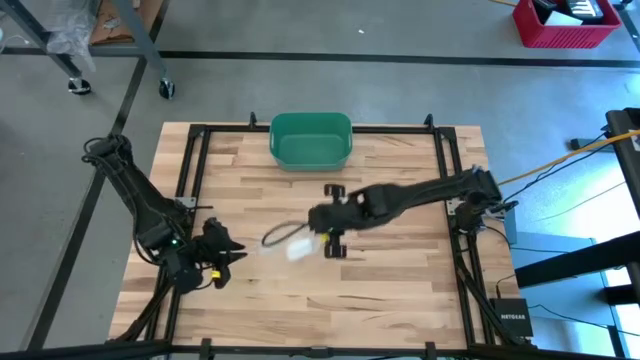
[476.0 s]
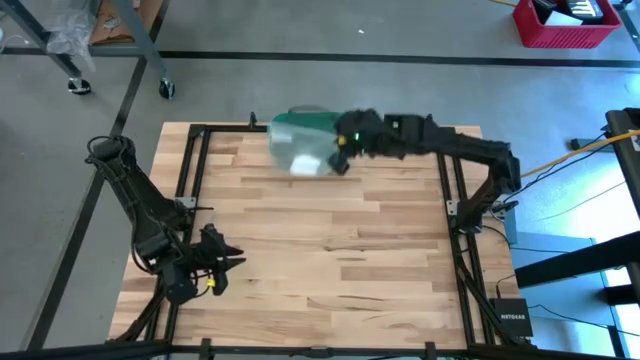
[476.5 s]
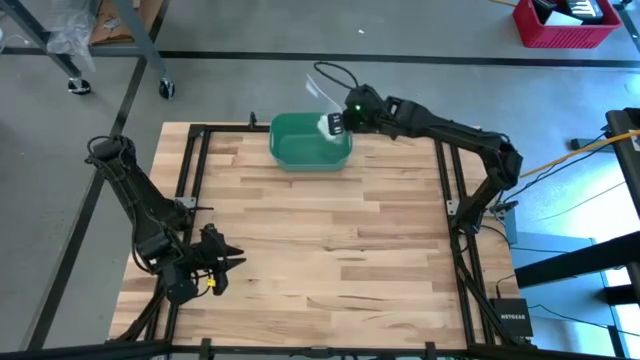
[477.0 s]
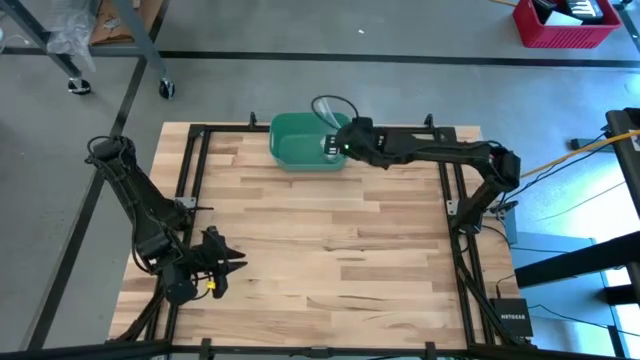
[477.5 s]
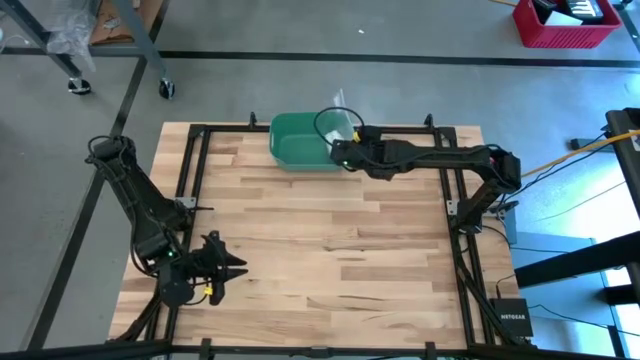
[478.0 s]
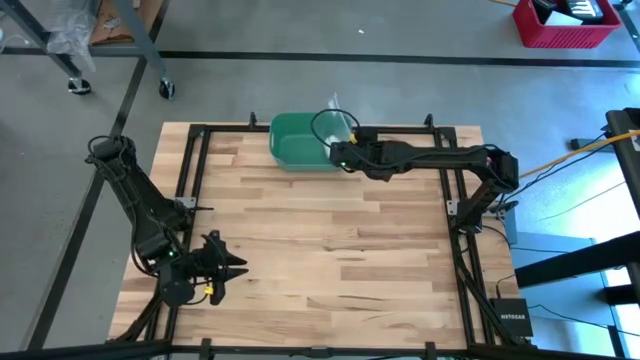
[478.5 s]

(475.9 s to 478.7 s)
Task: Roll bandage
Put the transparent zip bag into the green bin

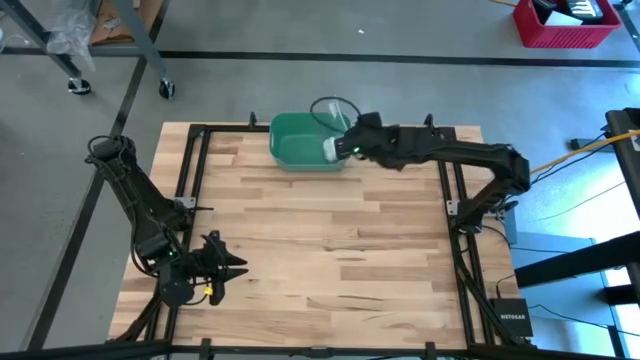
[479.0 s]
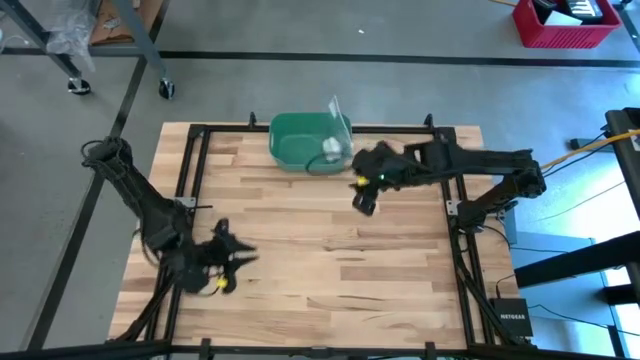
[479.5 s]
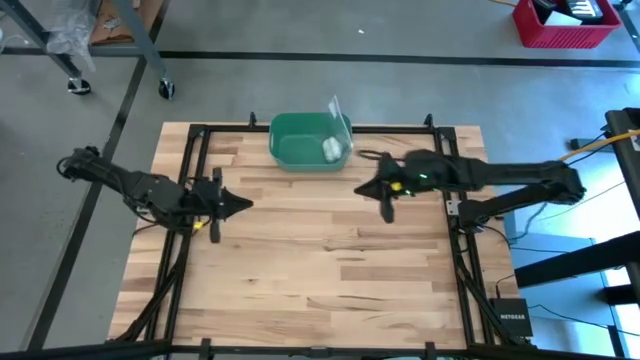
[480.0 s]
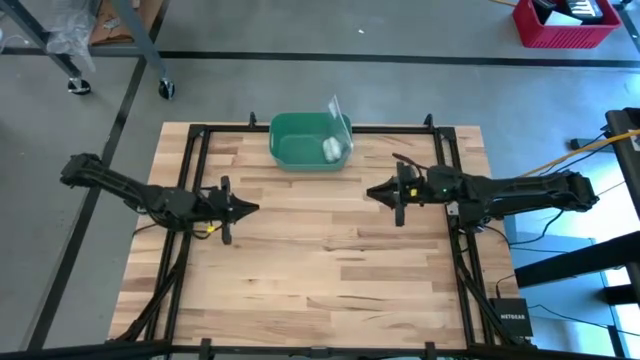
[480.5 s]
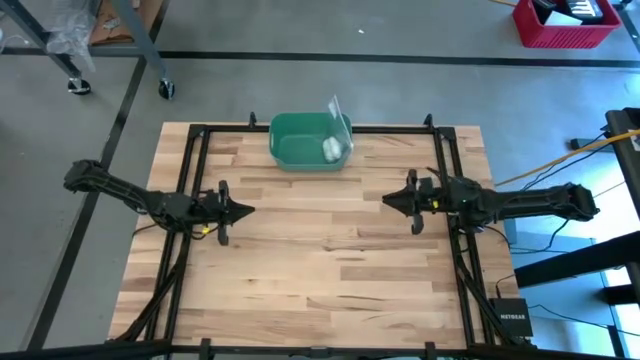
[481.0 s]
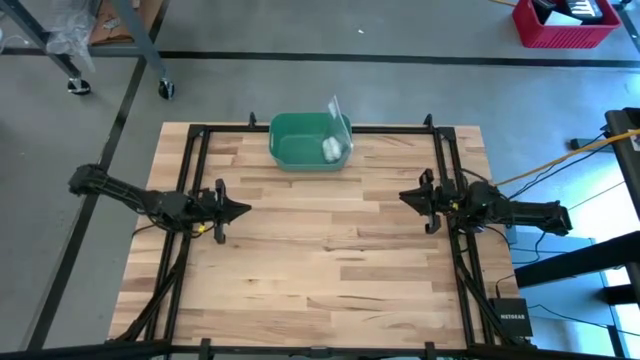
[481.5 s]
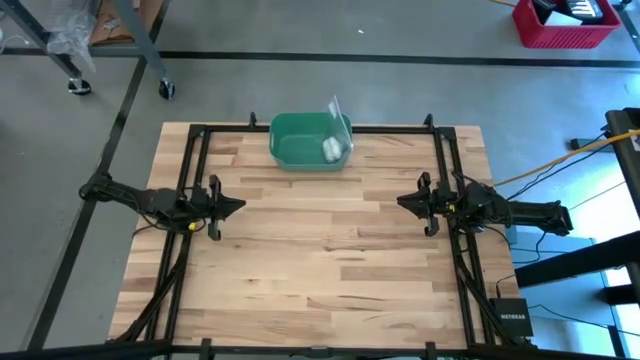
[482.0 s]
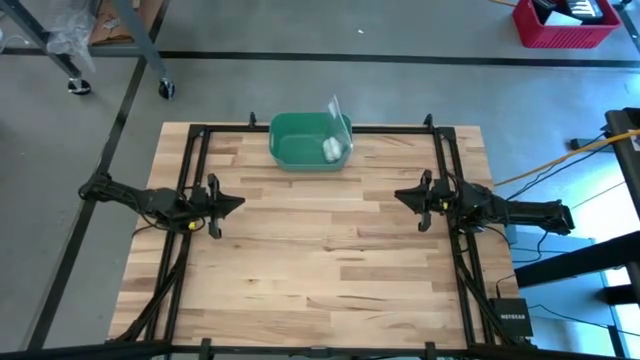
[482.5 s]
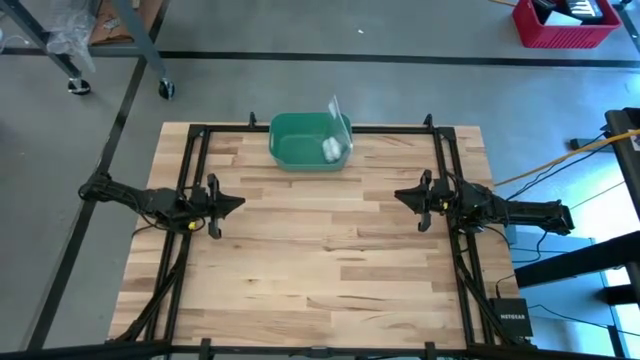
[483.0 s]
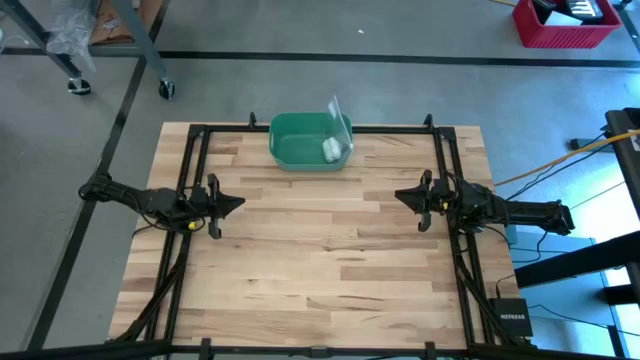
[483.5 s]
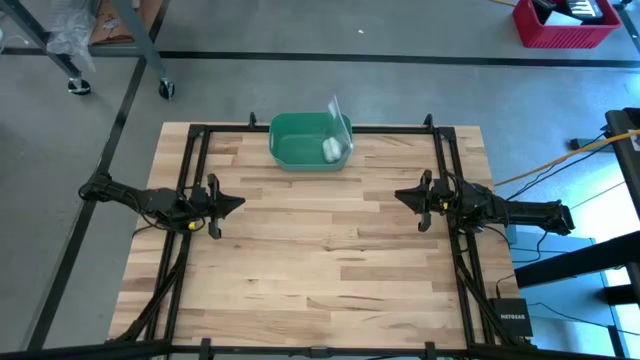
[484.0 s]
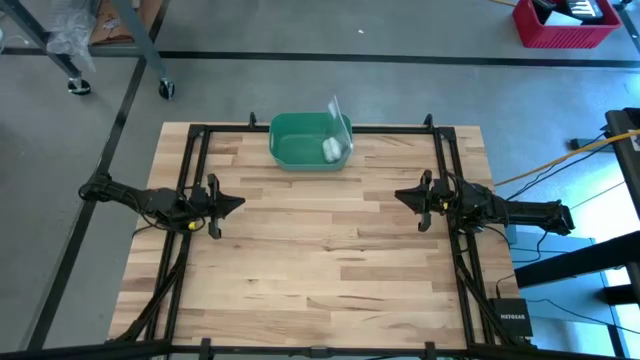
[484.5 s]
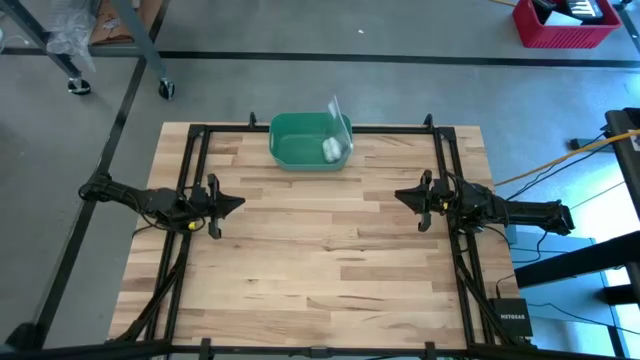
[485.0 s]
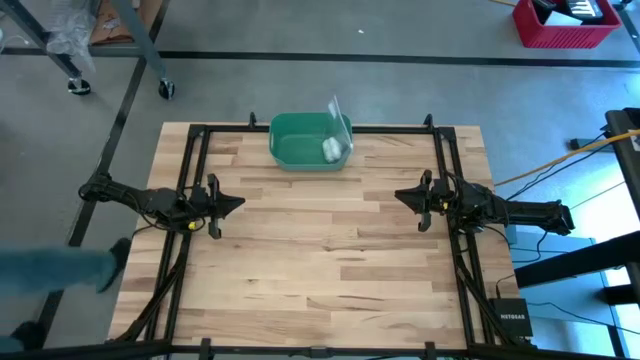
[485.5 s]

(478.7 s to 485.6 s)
Return to Home Position

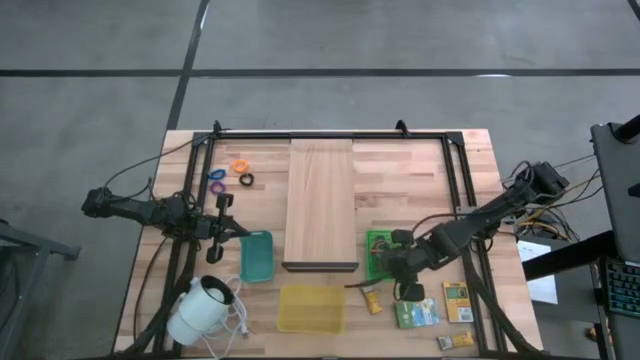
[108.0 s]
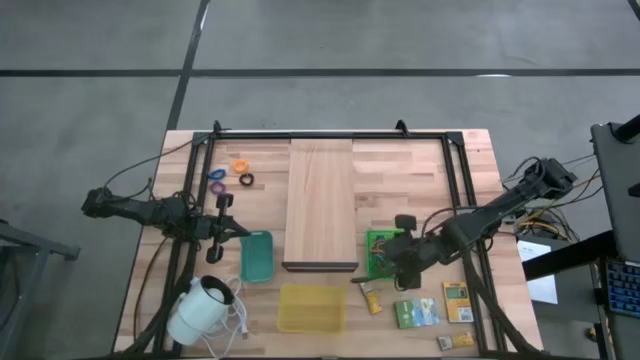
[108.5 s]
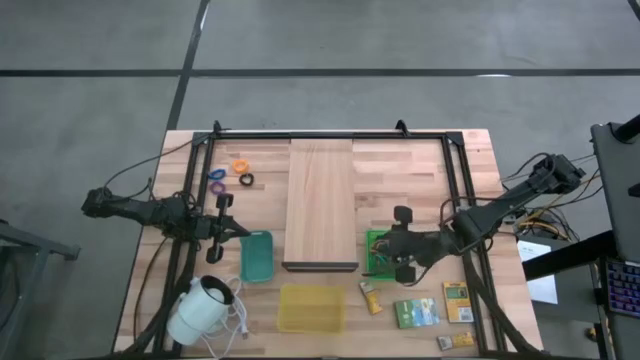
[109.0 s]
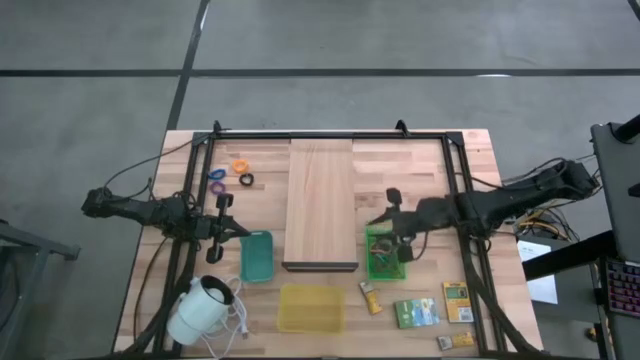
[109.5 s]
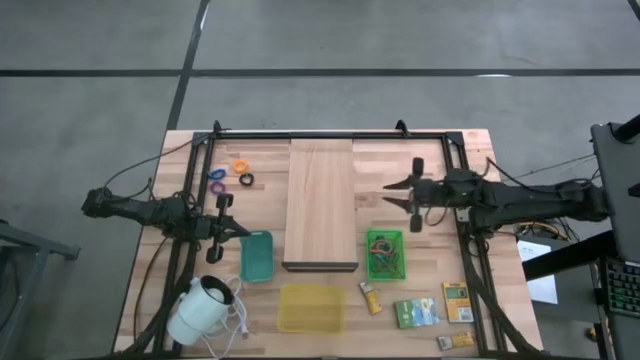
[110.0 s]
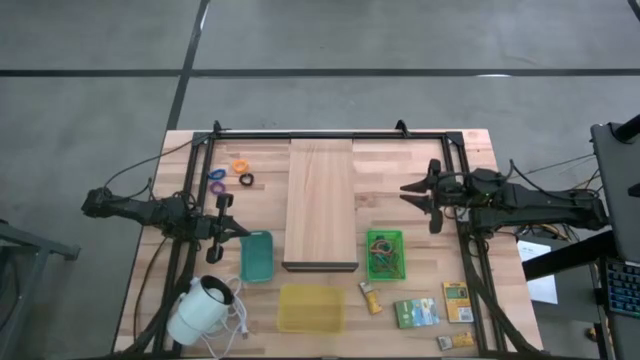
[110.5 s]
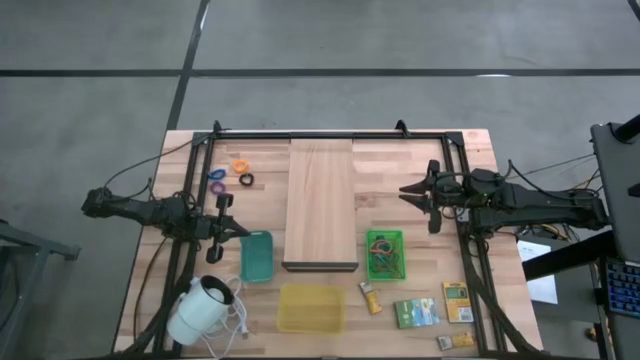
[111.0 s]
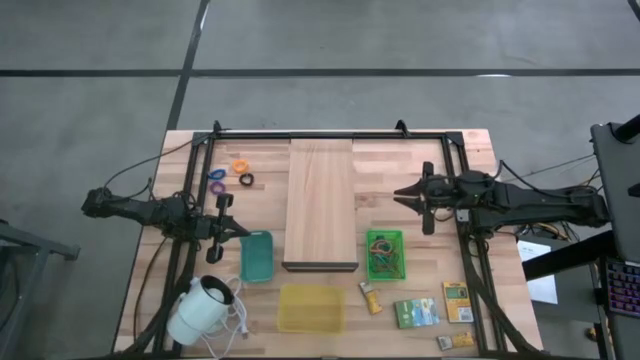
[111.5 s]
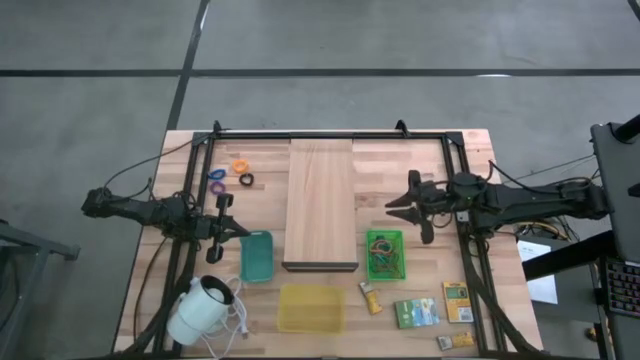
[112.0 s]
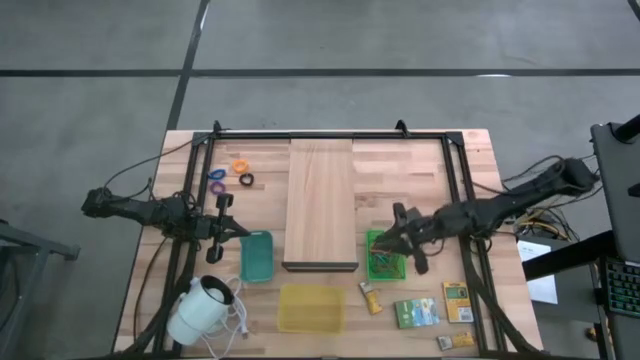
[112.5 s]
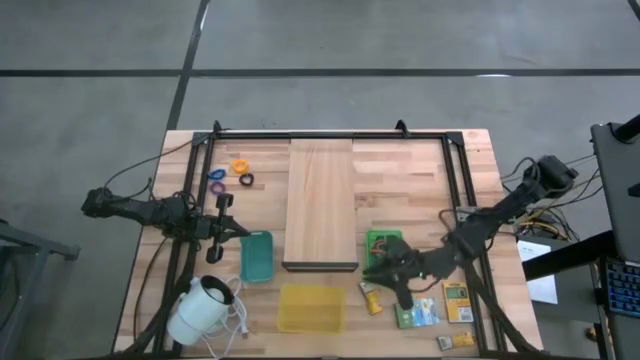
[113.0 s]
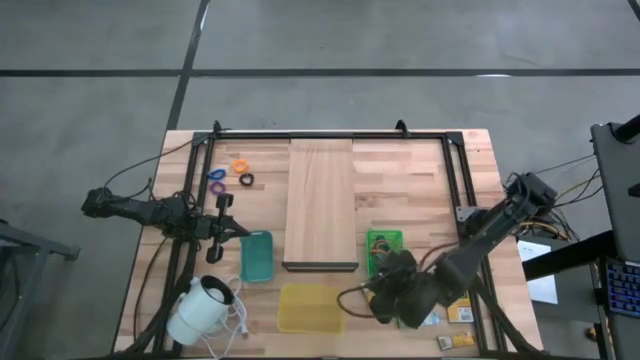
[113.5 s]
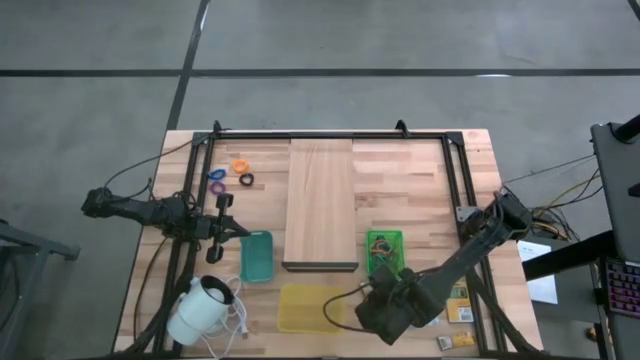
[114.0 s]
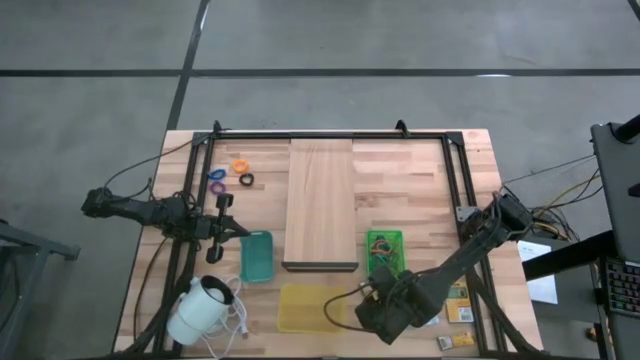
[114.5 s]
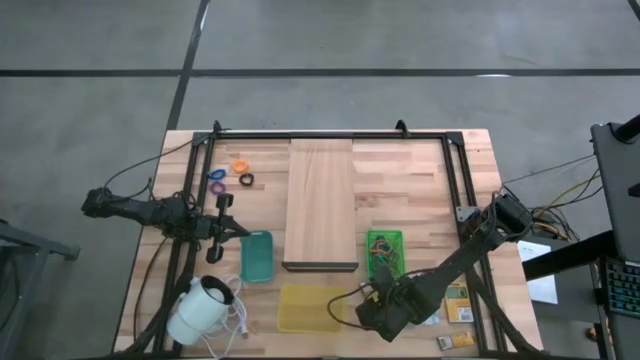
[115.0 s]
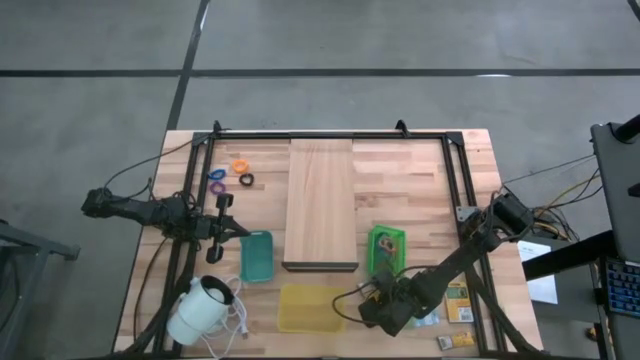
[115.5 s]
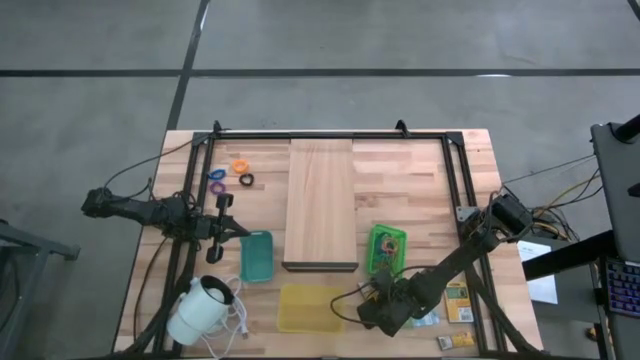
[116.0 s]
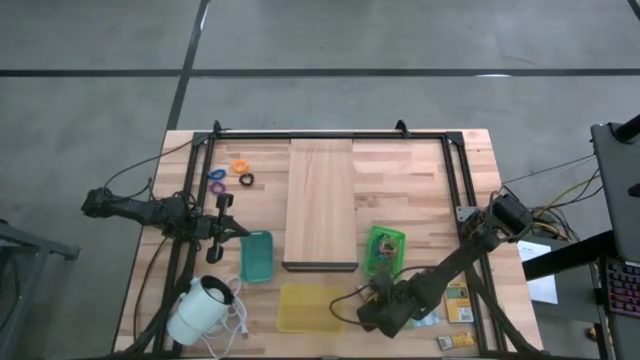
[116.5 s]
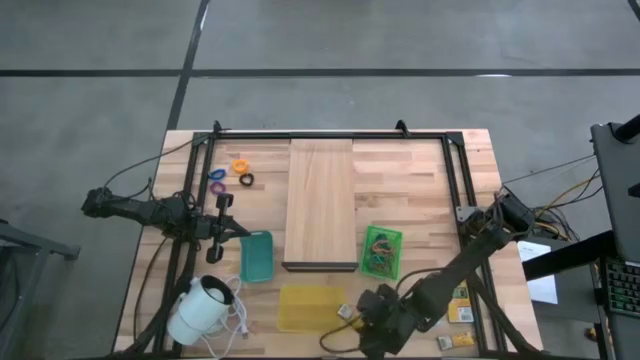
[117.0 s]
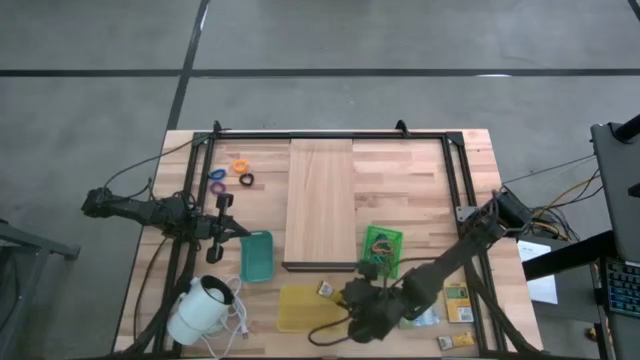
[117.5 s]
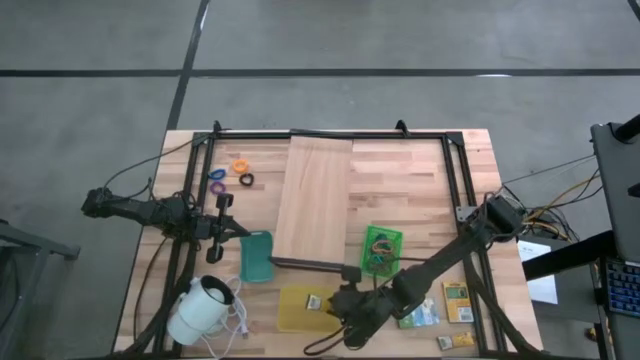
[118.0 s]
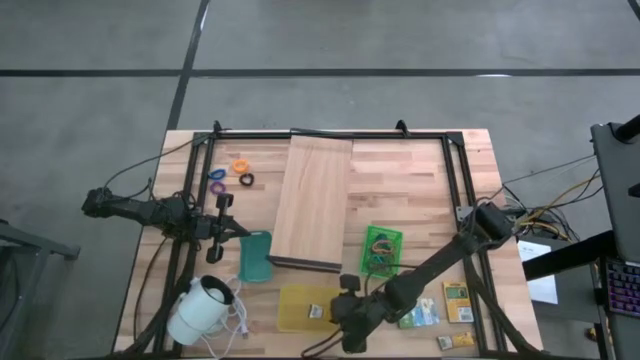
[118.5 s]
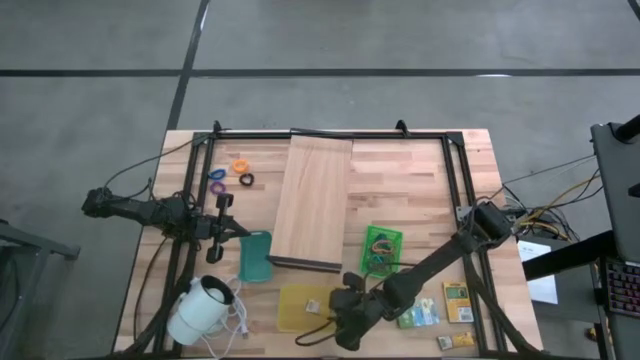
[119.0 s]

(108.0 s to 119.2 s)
Task: Pick & Place Office Desk Supplies
Put the top small yellow crayon box into the yellow bin
